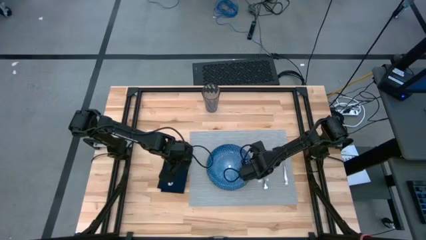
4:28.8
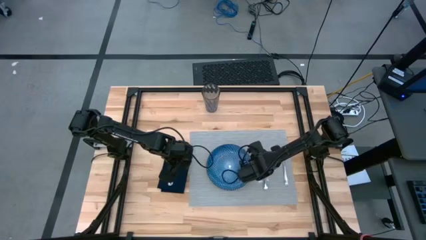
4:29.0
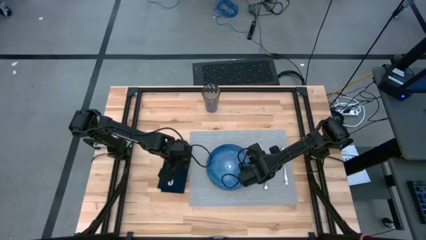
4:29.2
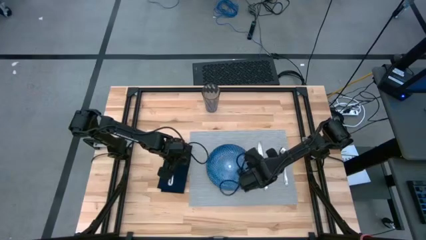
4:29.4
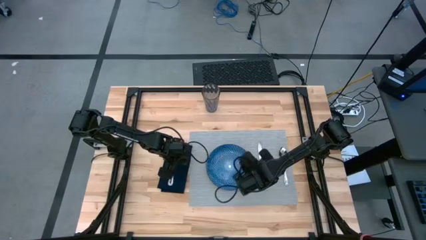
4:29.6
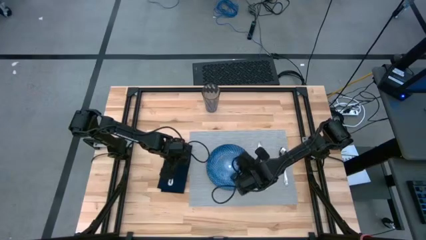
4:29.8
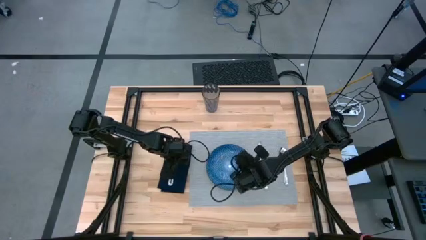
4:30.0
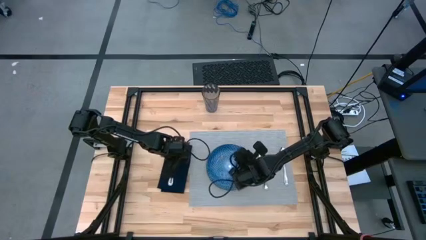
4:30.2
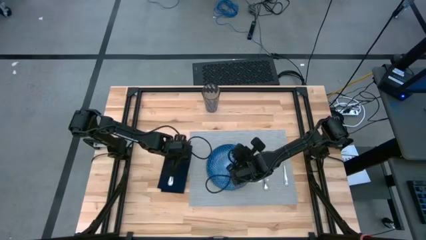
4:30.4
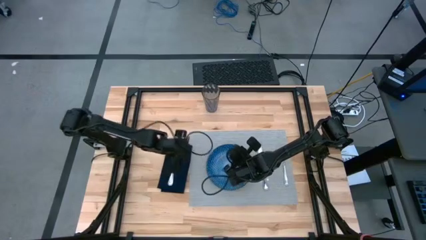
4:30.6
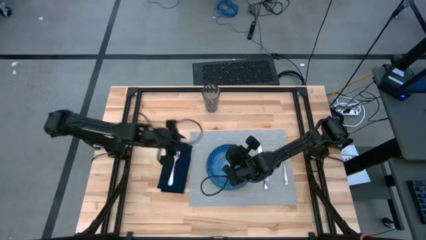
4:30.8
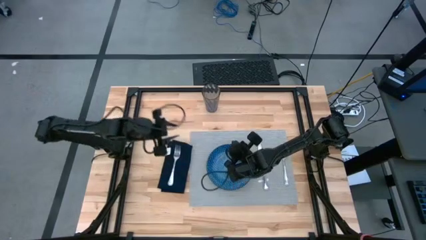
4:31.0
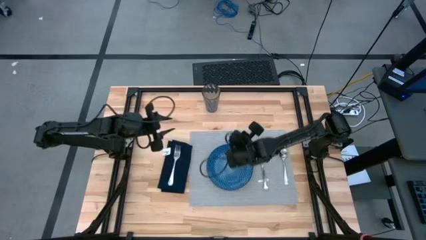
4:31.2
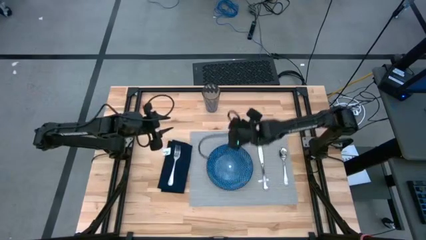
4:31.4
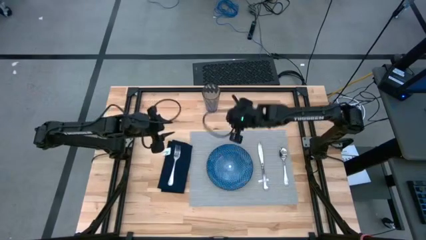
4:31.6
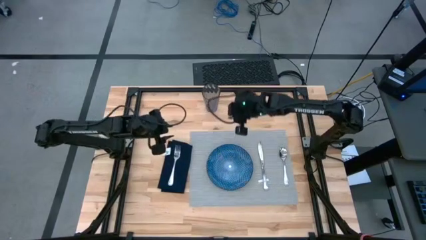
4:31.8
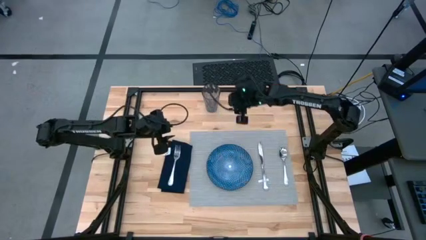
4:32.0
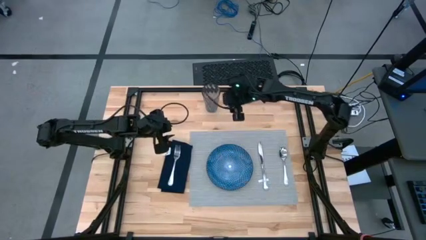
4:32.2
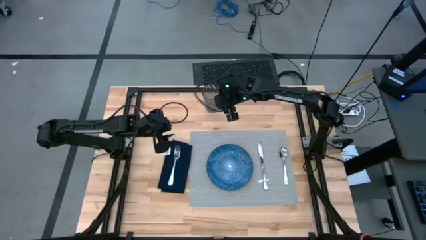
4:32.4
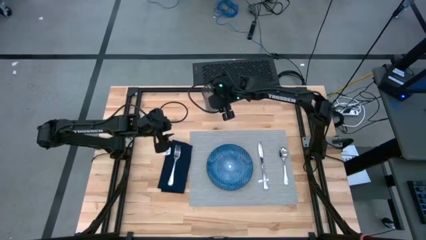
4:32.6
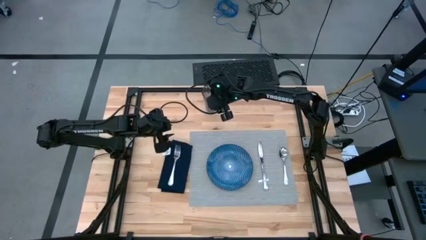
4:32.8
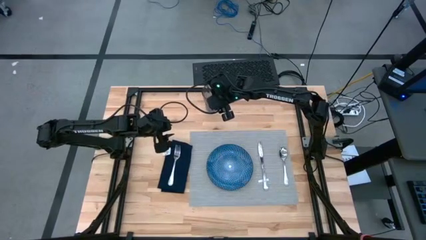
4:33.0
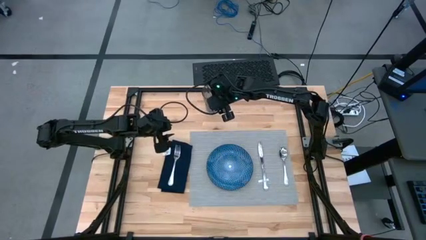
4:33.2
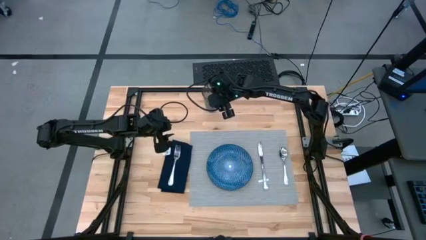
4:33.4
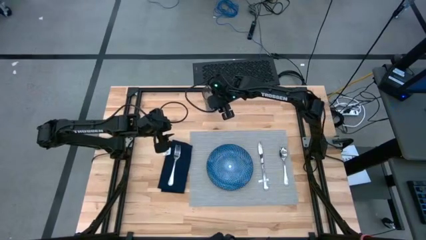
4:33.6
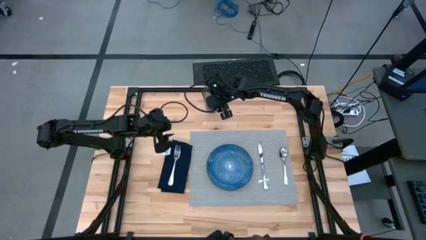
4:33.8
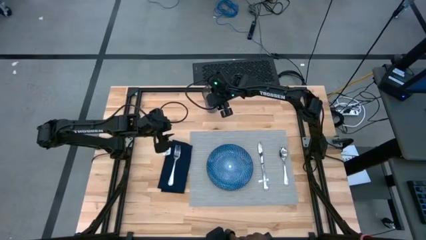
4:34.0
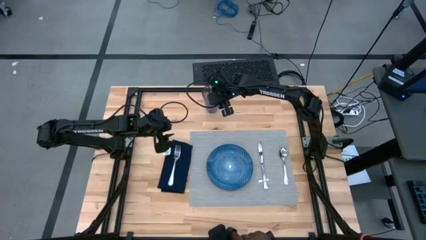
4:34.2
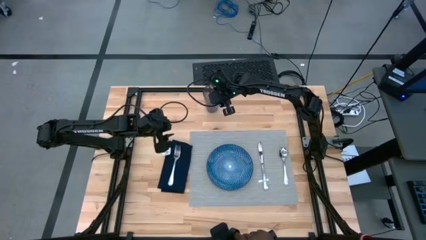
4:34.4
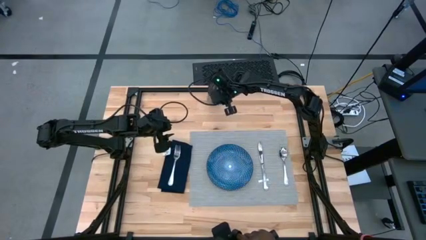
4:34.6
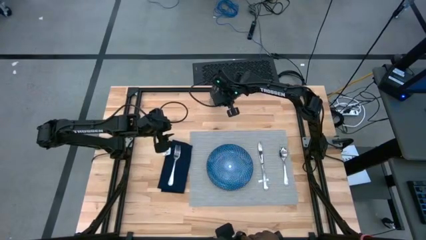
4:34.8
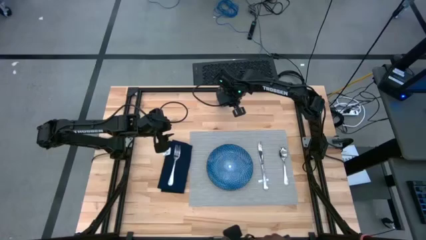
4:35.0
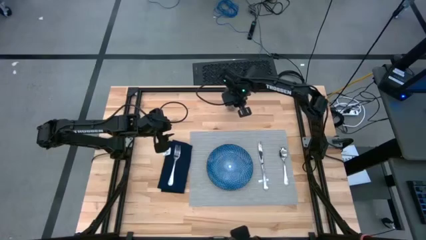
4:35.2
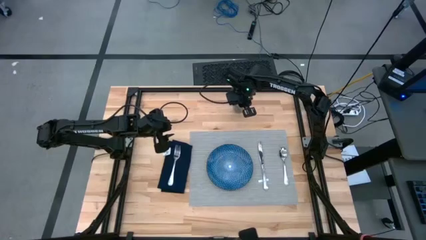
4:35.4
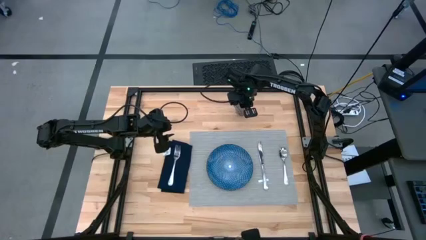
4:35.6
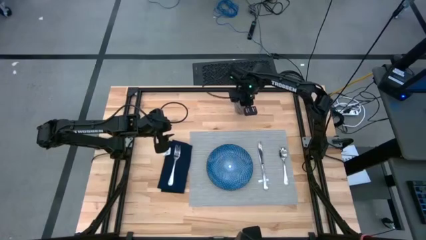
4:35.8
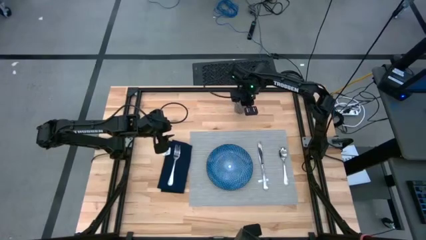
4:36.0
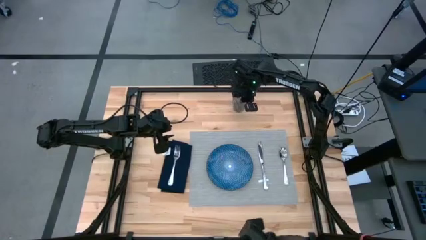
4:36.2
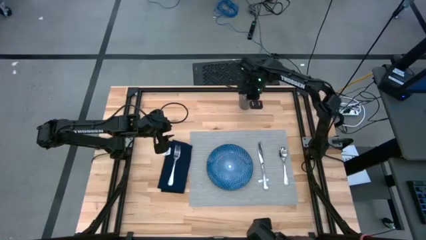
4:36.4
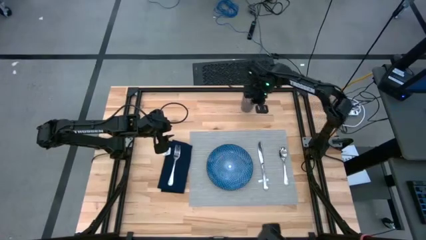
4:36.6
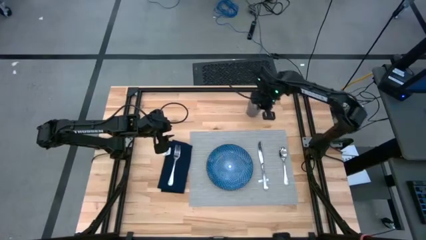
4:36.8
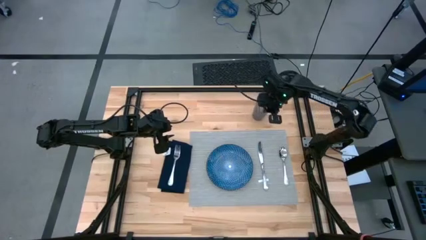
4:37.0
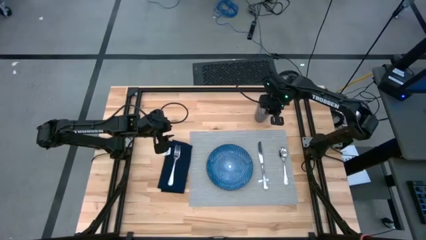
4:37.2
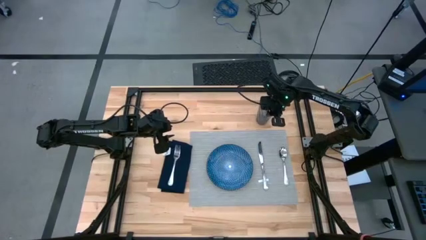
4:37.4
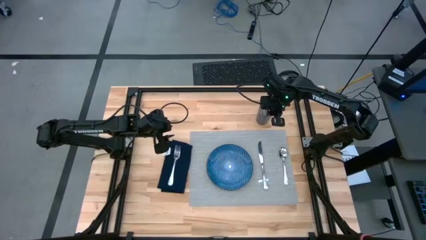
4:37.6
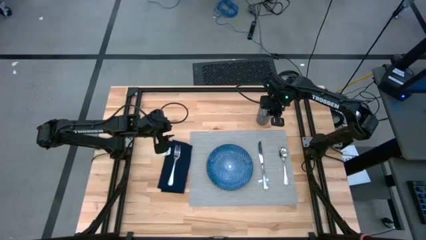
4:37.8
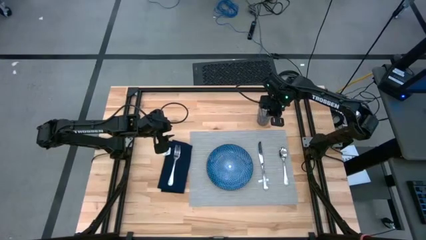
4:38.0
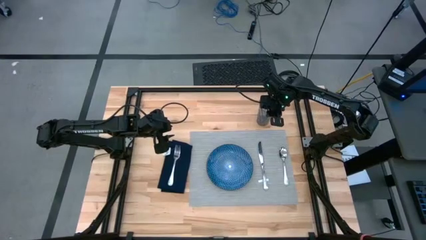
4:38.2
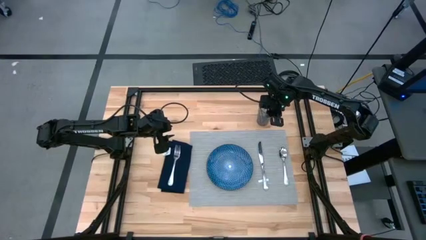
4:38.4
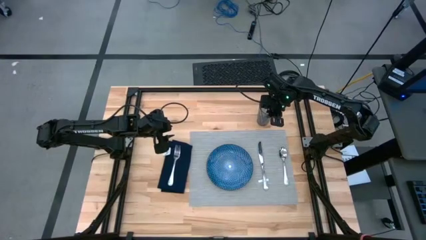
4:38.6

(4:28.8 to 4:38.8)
Task: Set table place
Move the blue cup to the top right of the table

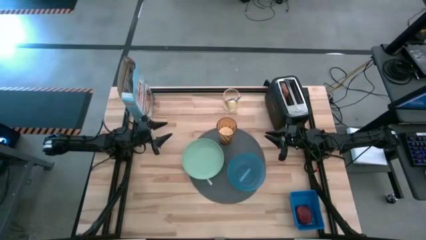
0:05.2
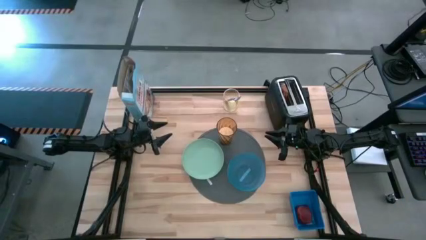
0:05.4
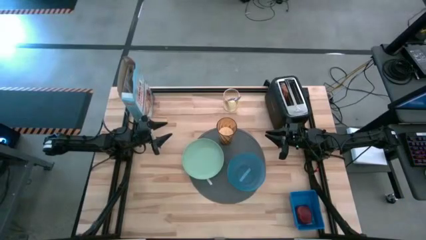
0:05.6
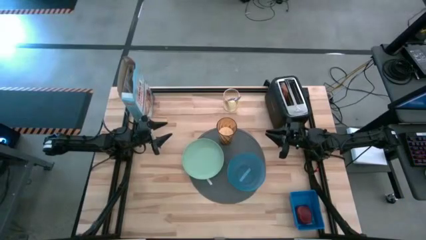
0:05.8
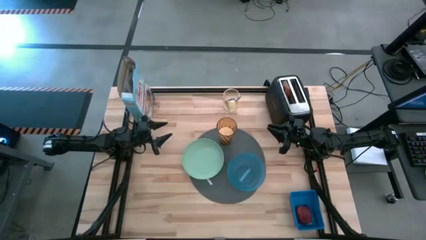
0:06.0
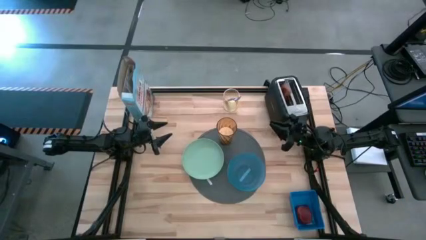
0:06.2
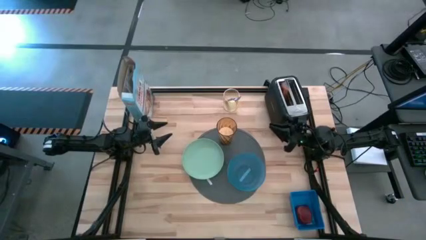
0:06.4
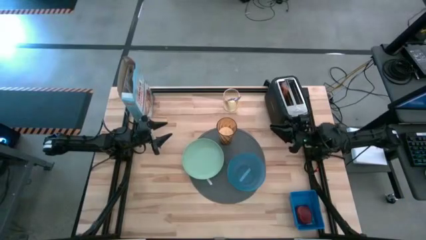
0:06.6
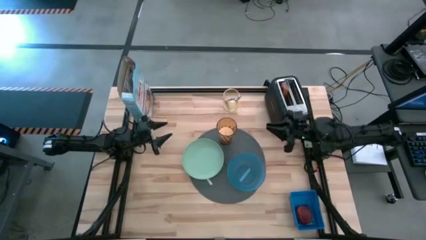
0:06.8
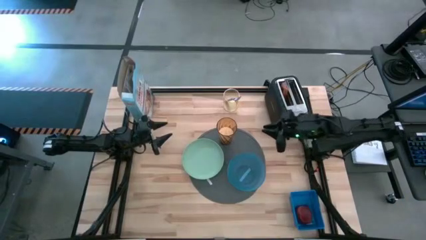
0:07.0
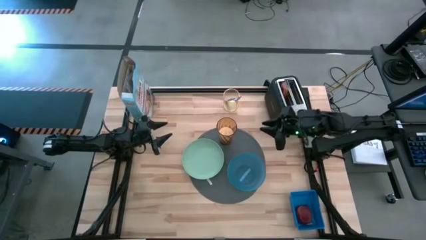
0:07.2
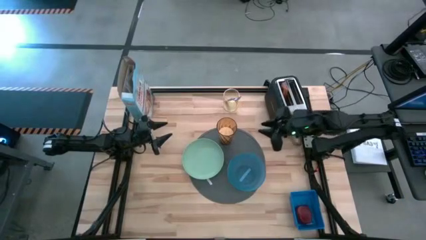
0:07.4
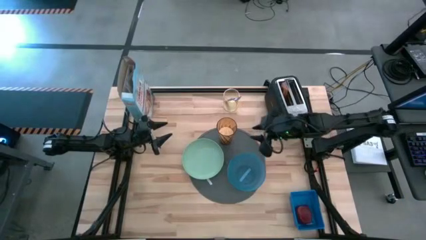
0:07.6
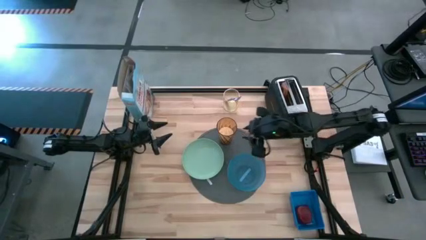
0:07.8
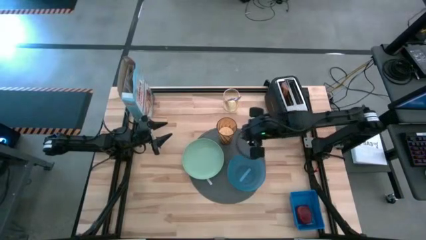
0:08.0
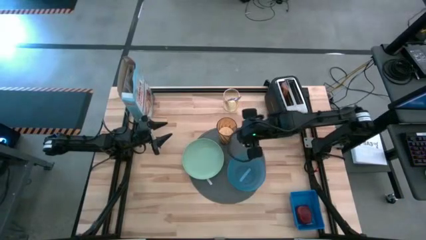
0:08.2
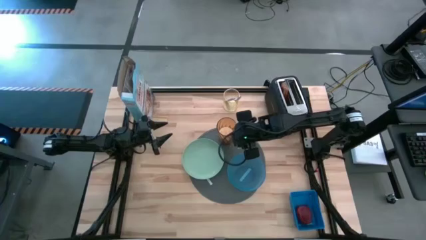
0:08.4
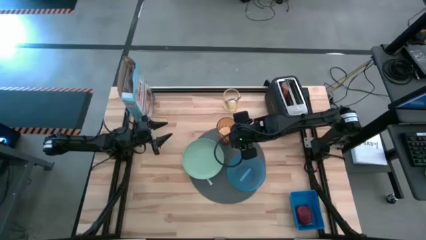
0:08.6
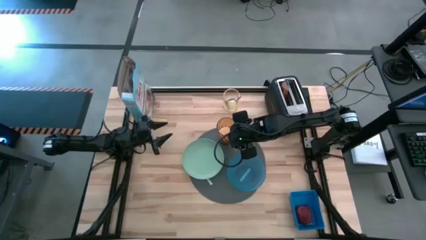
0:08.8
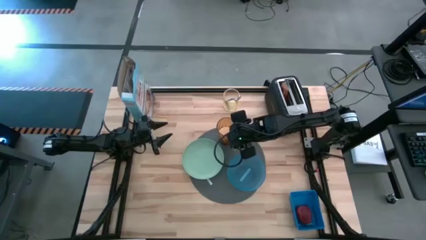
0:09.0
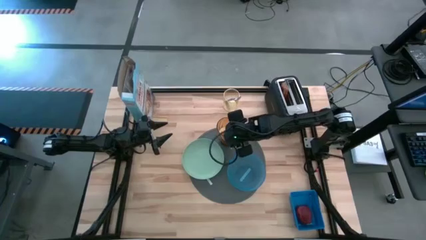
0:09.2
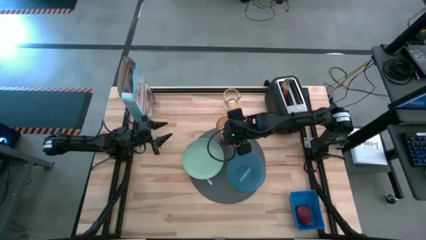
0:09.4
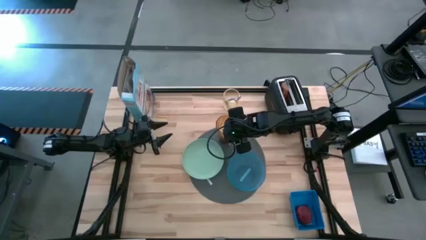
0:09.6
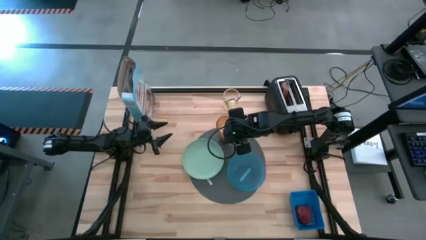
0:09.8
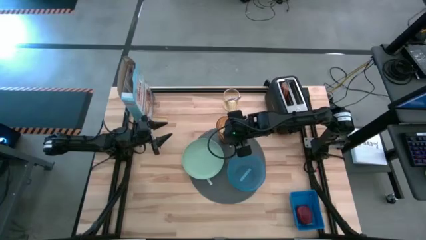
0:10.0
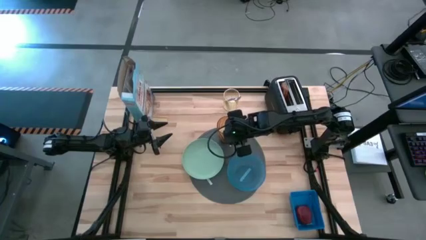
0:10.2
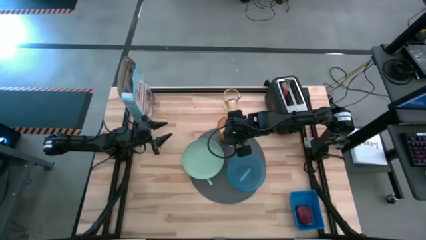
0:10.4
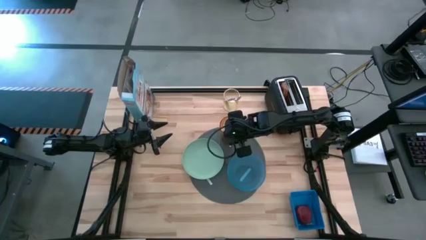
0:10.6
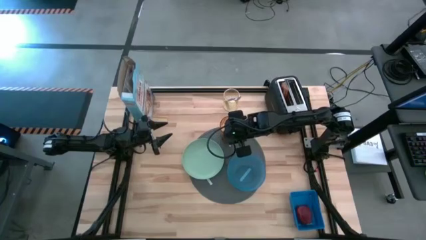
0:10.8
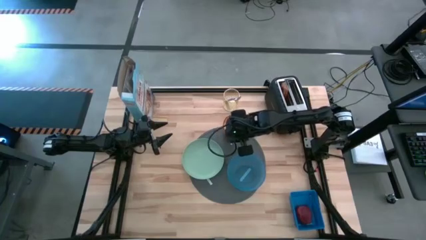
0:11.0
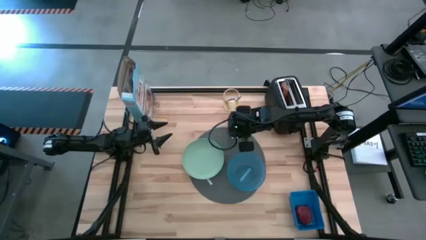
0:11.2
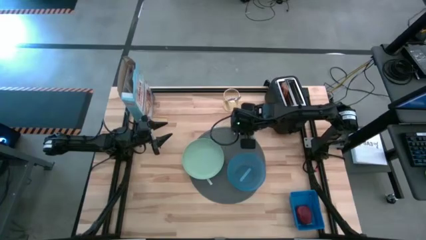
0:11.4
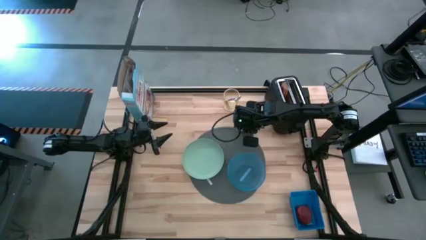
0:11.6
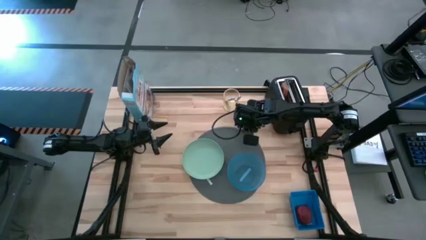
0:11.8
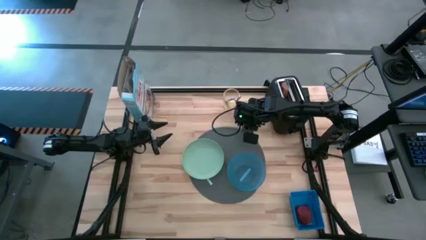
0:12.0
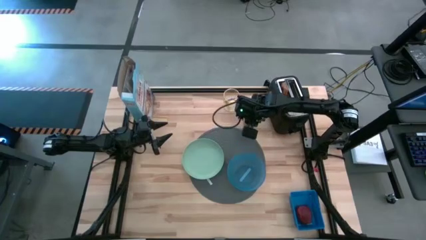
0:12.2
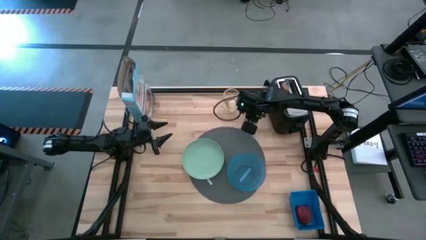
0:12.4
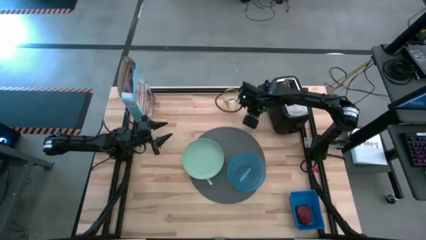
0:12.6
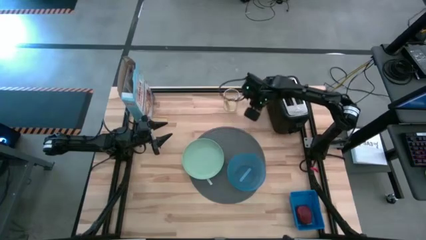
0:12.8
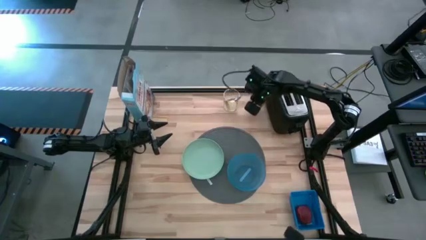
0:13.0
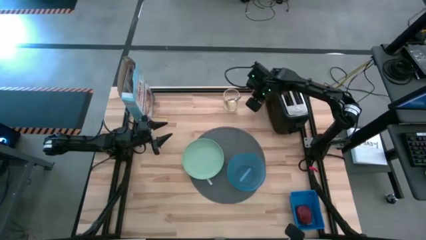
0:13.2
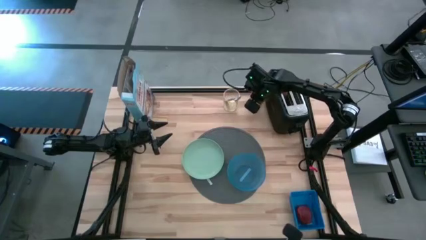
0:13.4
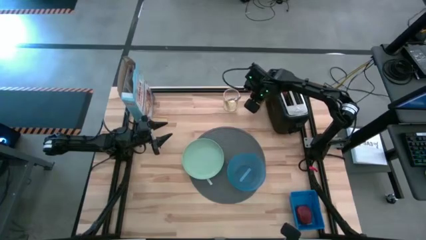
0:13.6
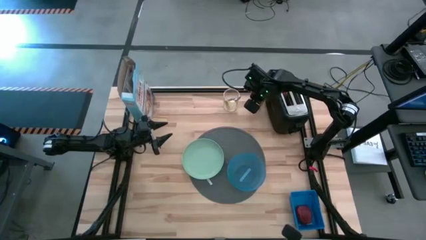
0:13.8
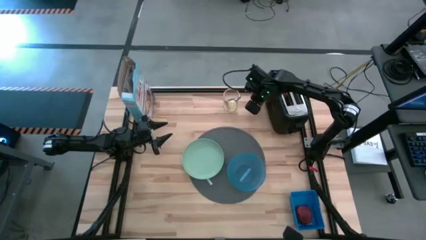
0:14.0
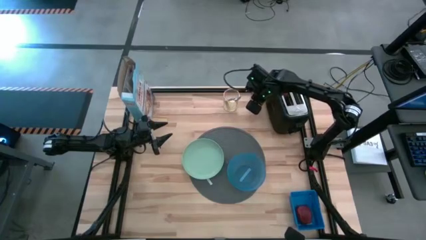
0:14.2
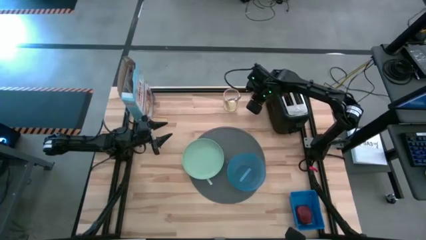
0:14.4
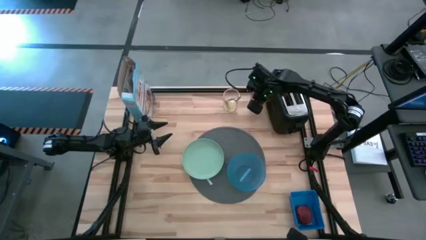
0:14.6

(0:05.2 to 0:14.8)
Task: Arrange a breakfast setting
Move the brown cup of milk to the upper right of the table
